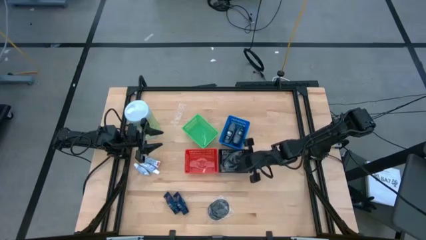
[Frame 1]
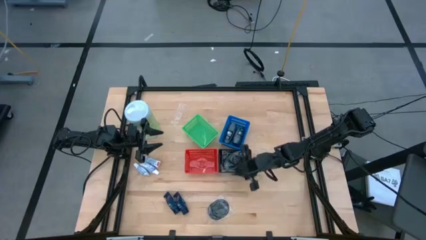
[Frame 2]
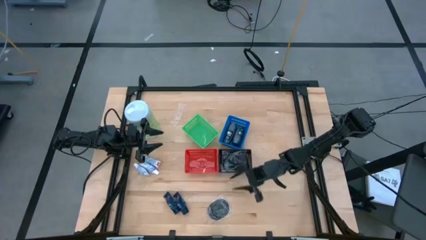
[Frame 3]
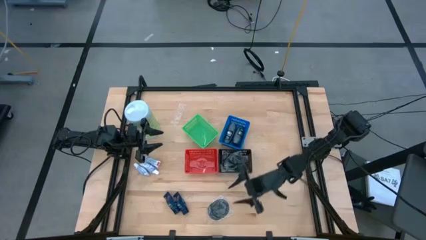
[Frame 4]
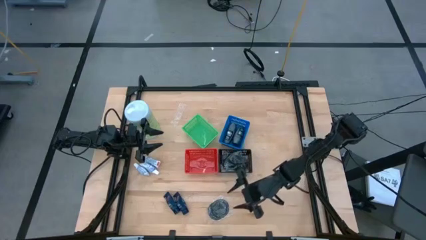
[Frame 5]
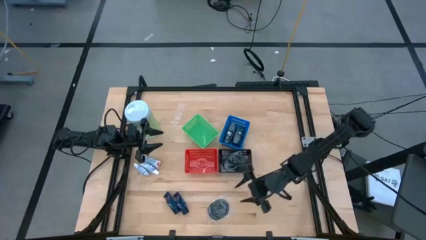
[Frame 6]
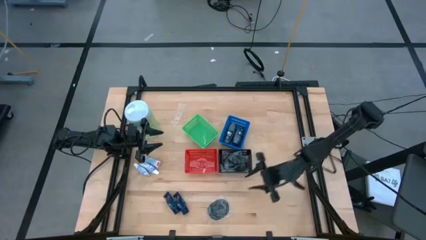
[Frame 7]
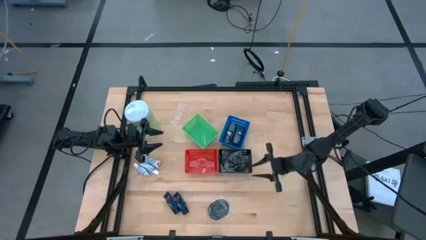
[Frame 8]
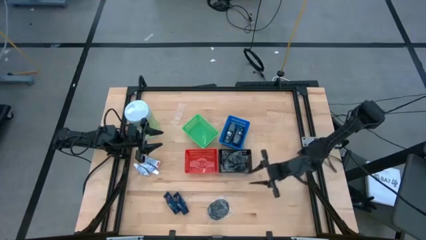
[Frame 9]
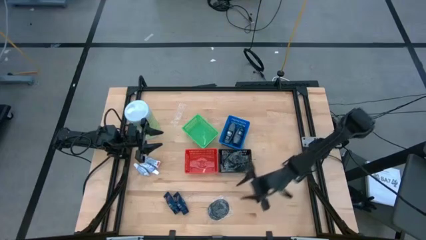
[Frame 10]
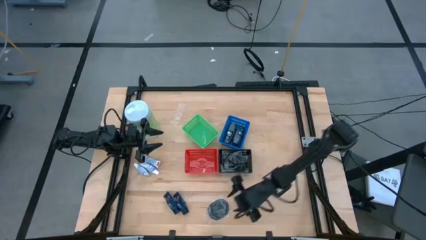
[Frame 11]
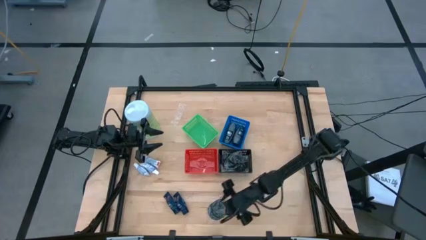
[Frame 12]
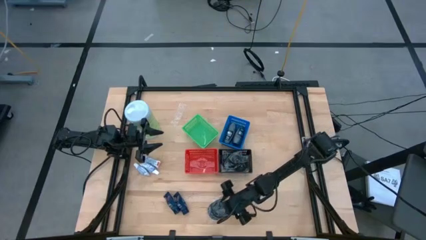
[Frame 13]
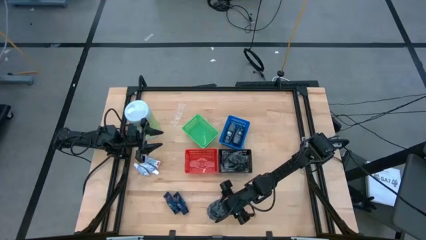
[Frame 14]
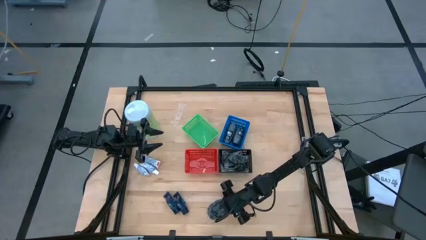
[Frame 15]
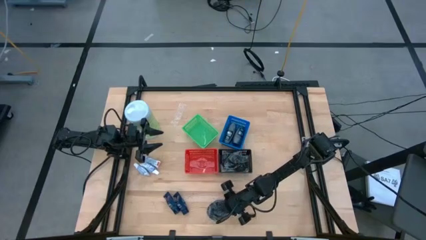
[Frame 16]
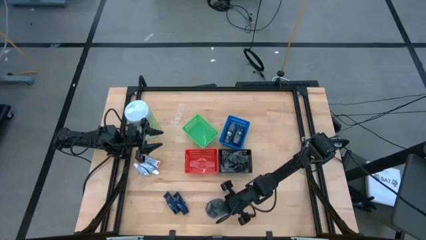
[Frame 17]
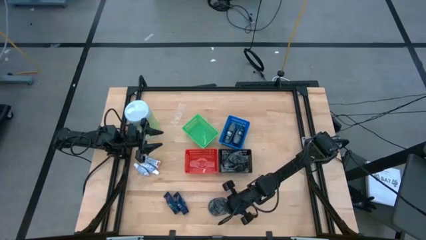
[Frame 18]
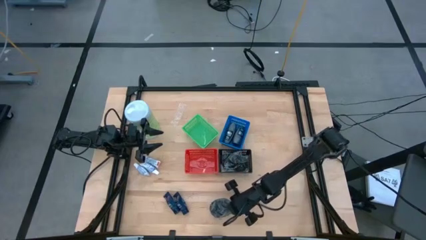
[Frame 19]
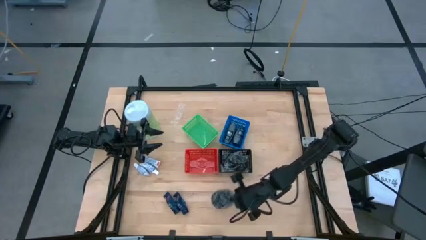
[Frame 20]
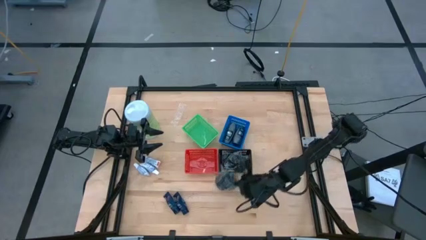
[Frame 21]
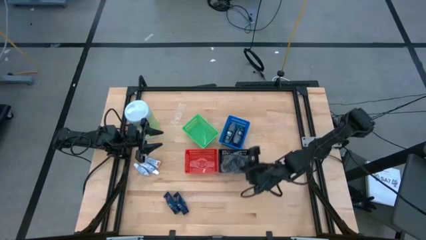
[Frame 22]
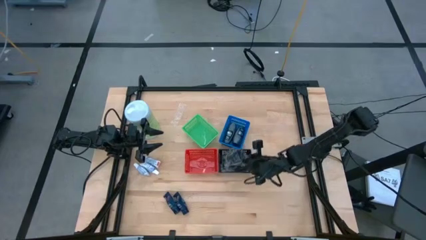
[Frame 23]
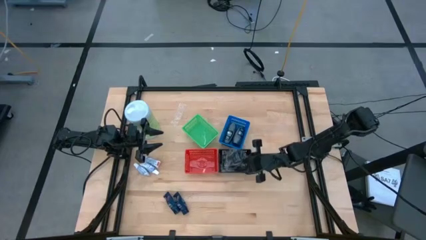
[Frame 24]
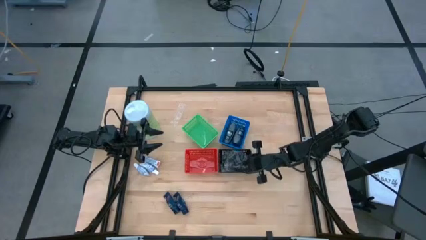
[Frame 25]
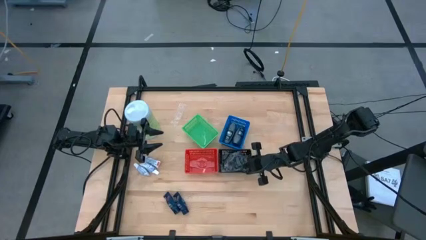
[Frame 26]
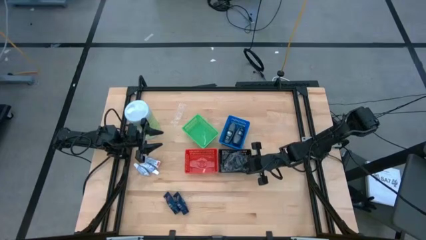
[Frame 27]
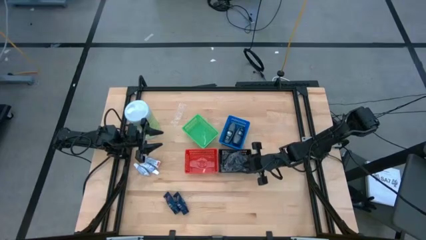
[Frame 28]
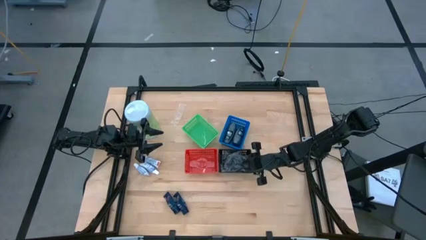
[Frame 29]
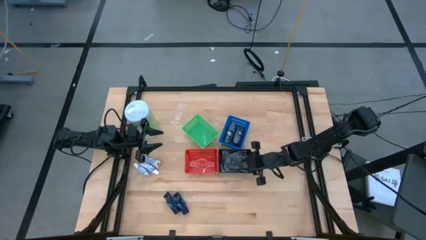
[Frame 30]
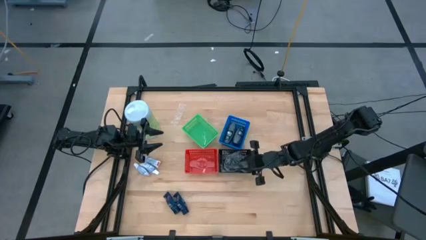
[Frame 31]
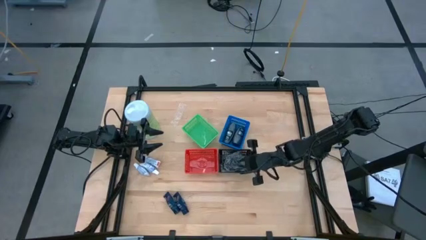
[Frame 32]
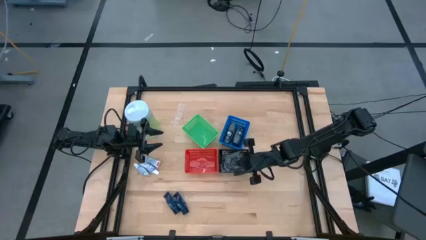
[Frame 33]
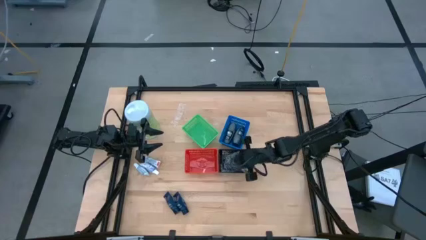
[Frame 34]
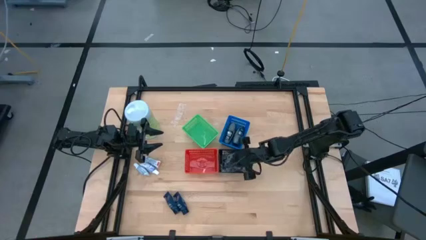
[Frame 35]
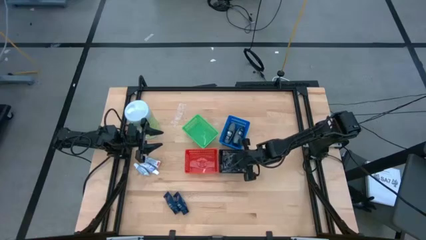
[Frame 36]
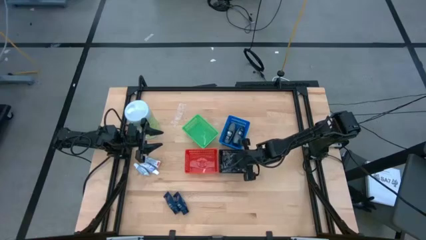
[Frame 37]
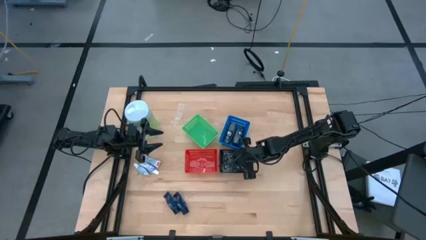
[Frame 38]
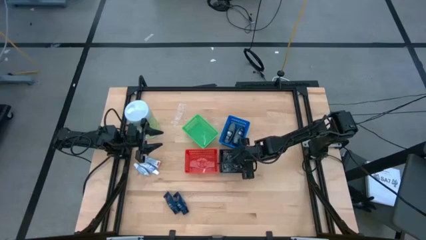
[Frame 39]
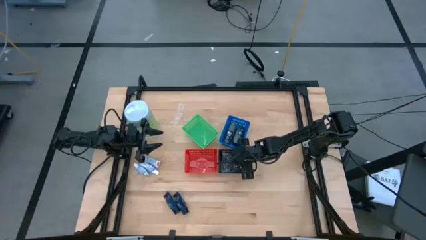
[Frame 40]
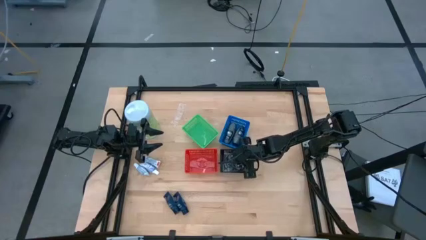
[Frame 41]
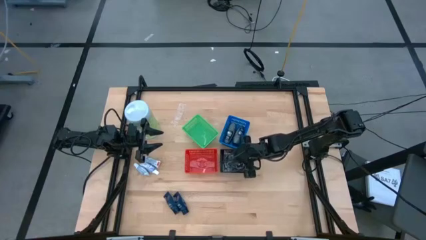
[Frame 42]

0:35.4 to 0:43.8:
Task: Pick & Place Travel size toiletries
Put the hairbrush into the black bin

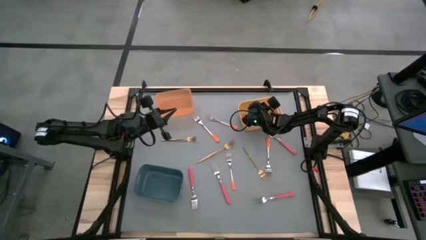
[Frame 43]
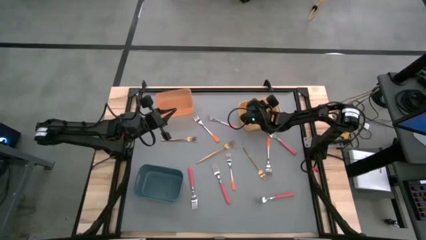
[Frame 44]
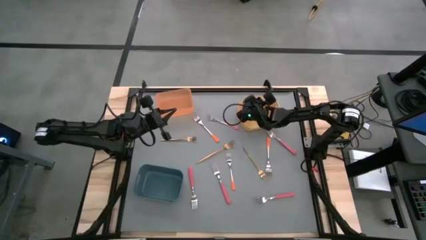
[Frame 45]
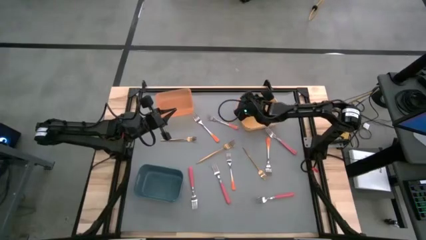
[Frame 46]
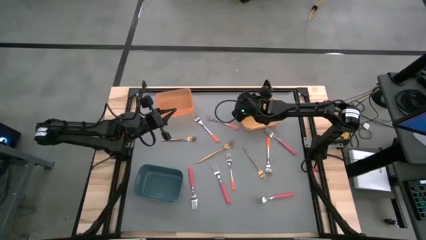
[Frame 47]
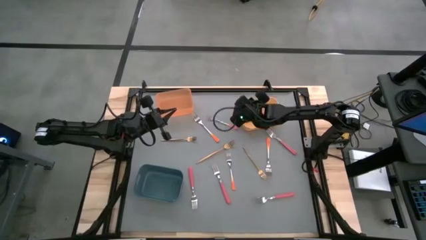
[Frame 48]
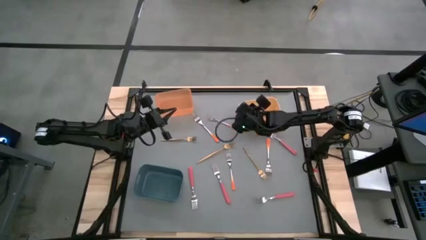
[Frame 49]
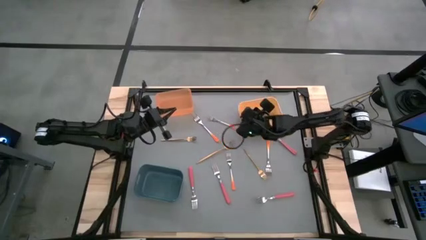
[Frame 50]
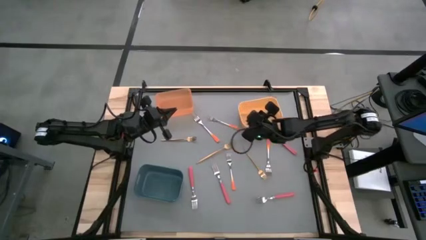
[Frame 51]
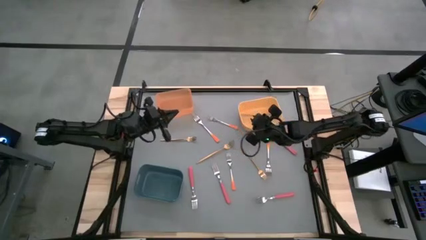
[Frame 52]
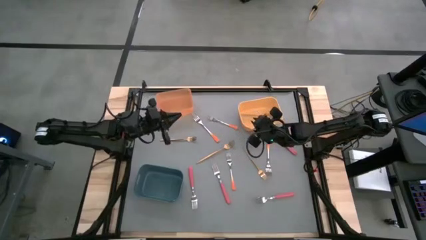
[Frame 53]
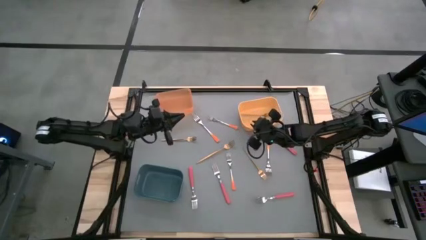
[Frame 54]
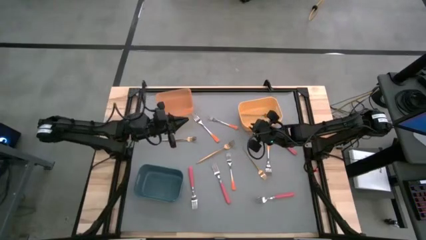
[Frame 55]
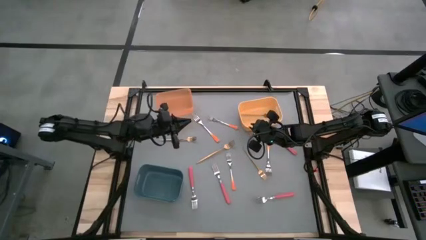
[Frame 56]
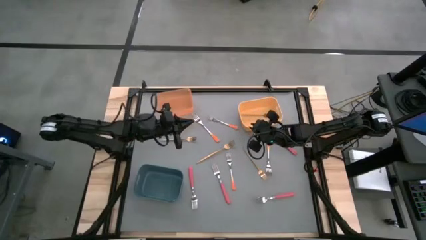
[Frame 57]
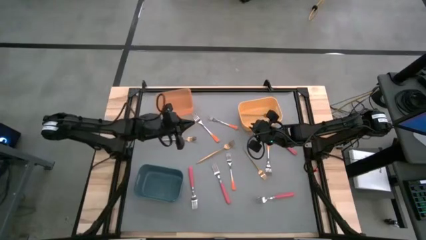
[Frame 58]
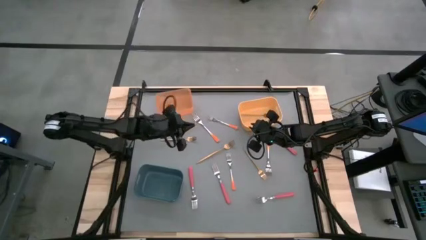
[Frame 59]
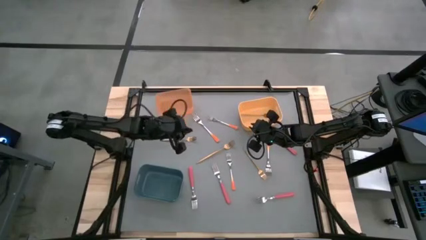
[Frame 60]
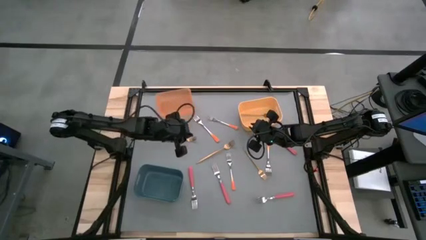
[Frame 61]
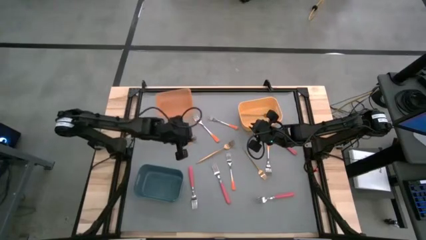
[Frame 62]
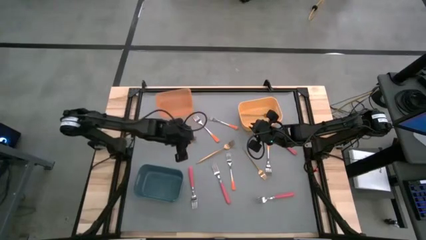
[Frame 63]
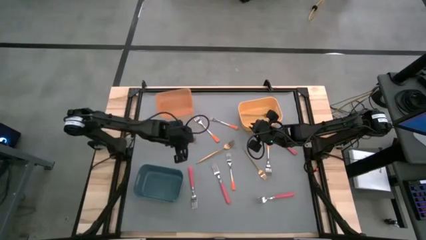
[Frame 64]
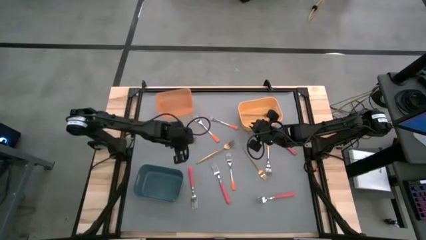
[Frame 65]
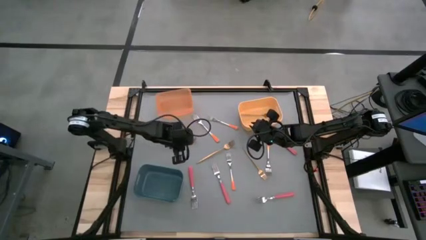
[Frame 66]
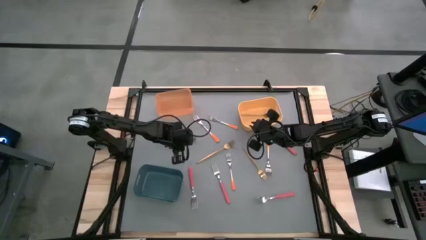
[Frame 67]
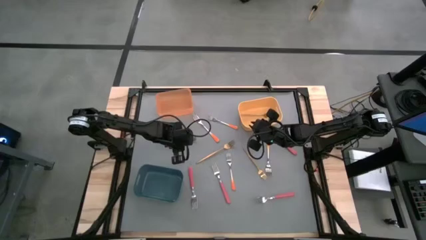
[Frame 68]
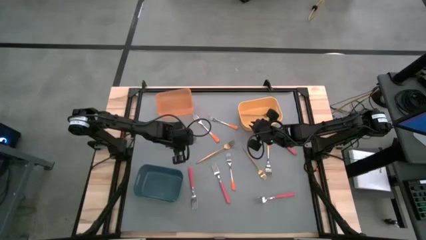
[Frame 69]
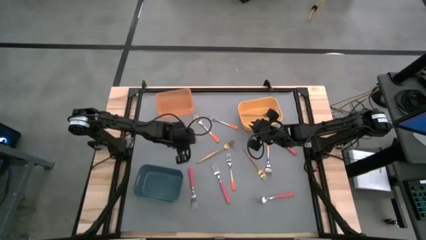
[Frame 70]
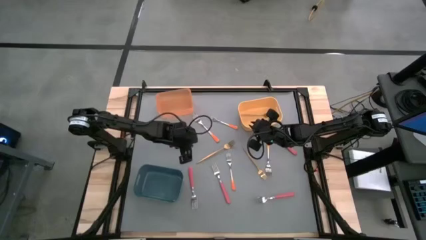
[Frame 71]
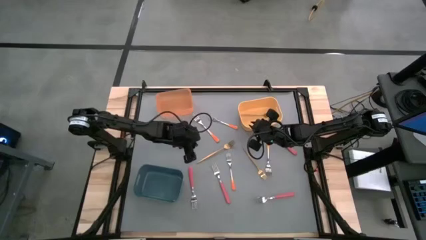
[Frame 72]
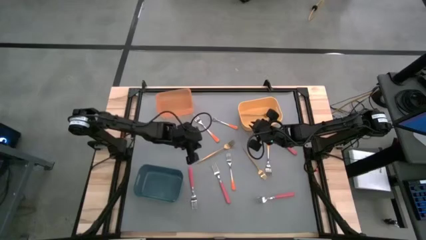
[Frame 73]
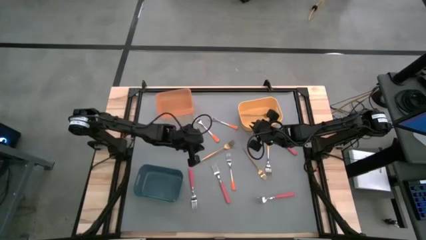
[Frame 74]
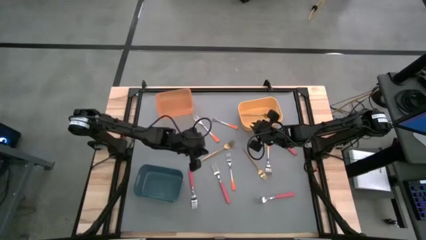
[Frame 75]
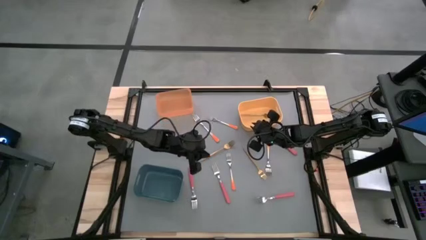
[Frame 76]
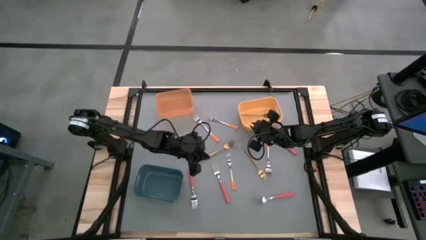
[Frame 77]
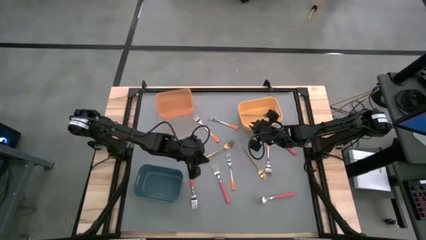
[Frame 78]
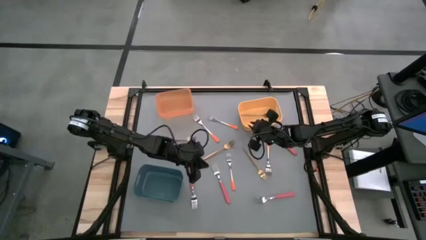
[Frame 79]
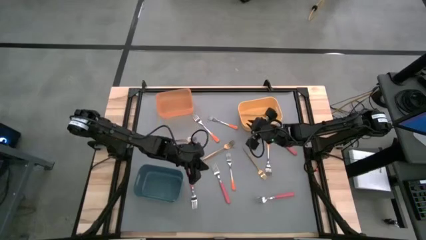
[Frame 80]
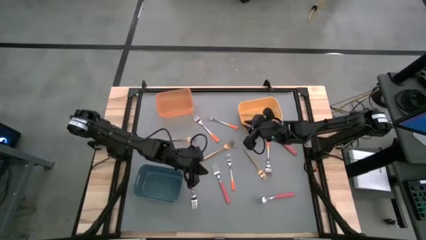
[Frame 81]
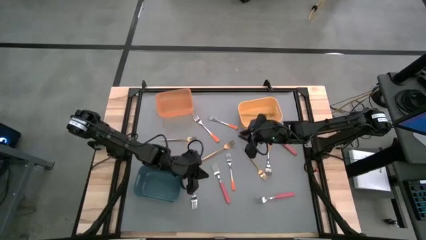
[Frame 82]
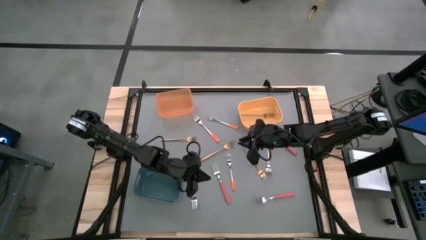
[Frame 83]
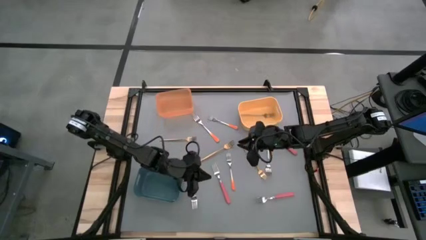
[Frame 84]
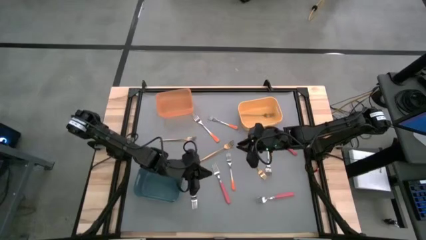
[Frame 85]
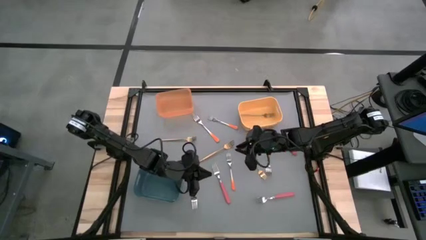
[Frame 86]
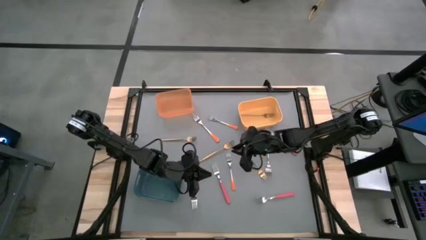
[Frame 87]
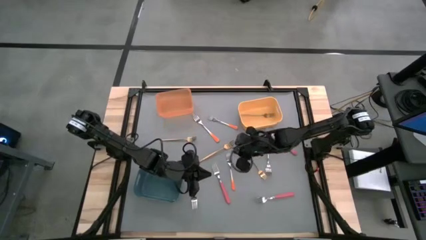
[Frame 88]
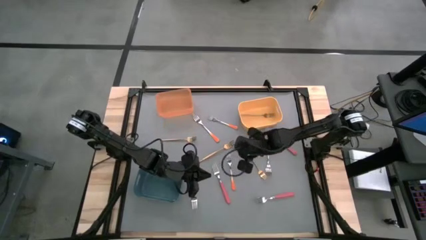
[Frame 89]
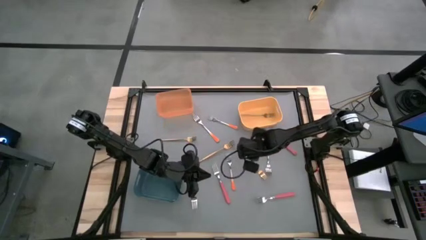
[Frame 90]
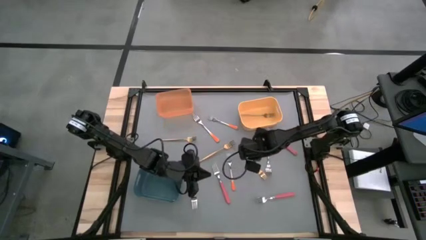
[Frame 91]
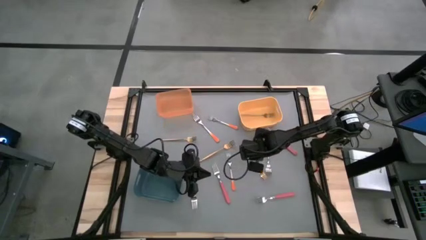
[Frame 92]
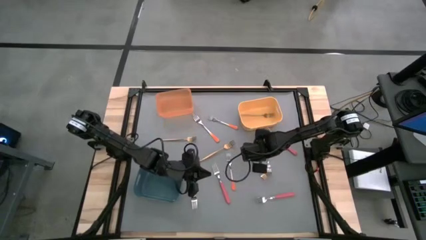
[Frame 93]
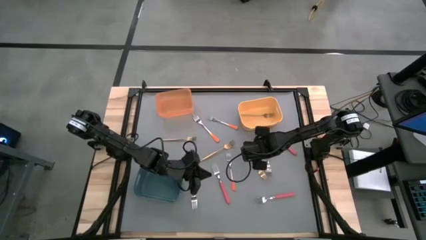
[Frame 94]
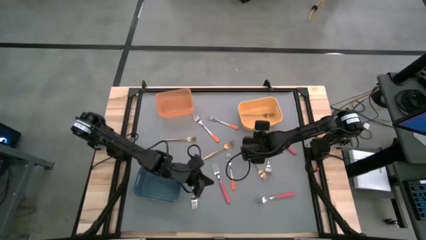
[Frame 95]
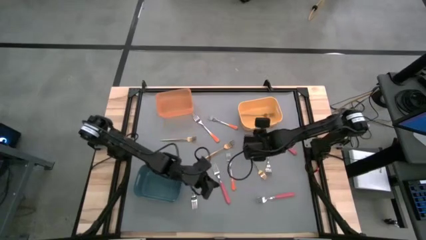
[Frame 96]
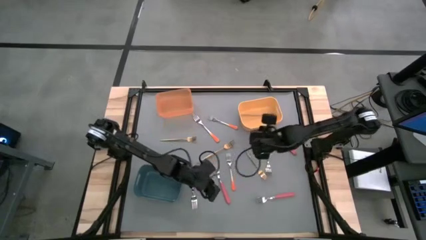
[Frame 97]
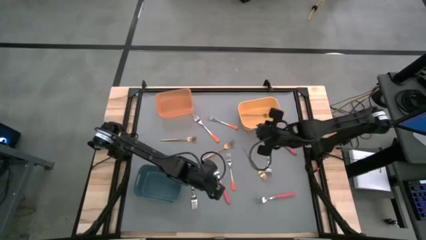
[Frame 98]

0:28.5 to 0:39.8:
Task: Sort silverware by color (type)
Put the pink fork into the blue bin
